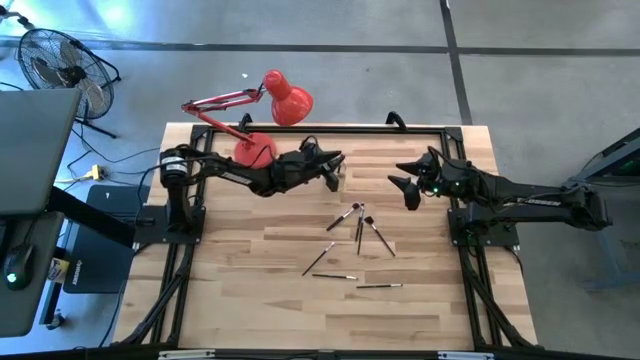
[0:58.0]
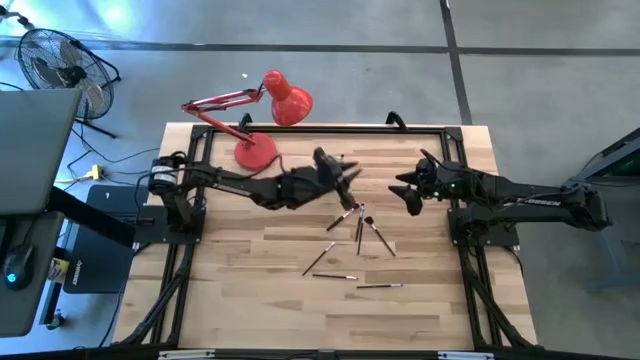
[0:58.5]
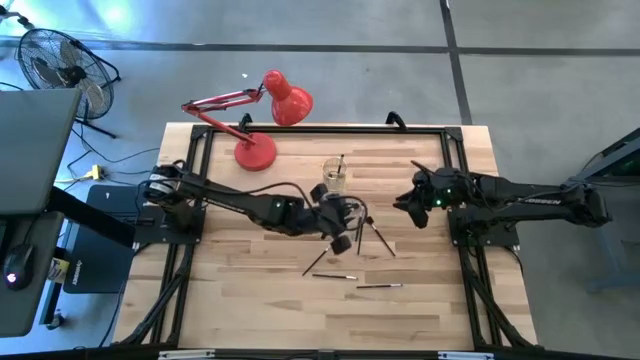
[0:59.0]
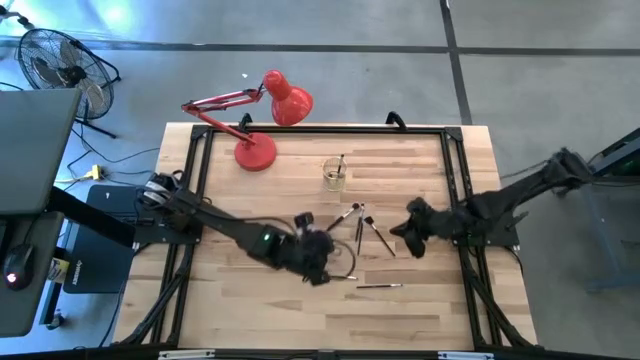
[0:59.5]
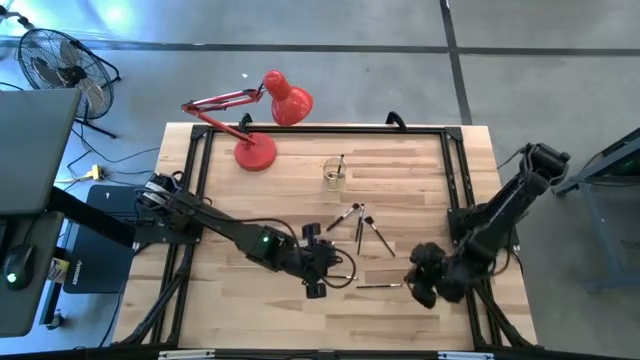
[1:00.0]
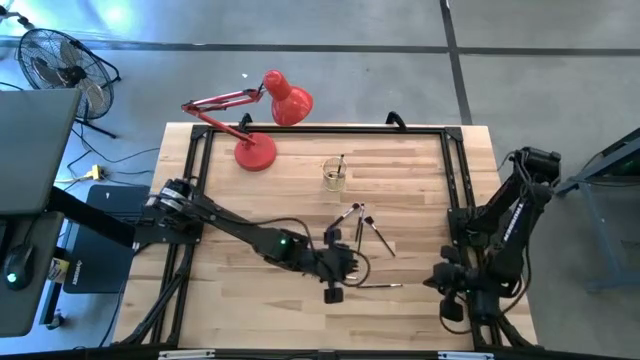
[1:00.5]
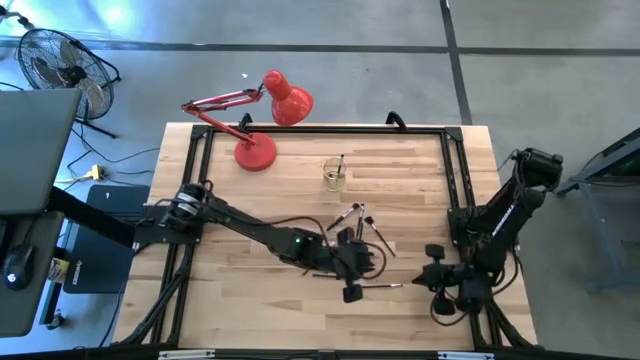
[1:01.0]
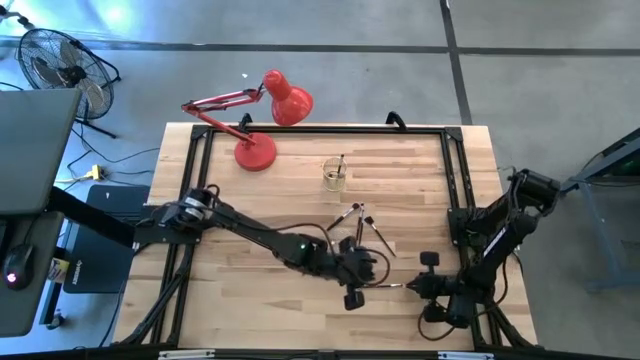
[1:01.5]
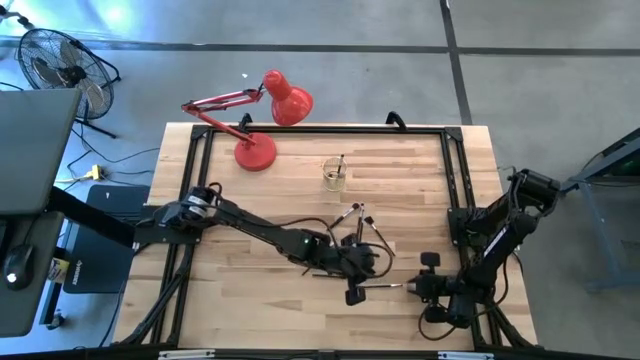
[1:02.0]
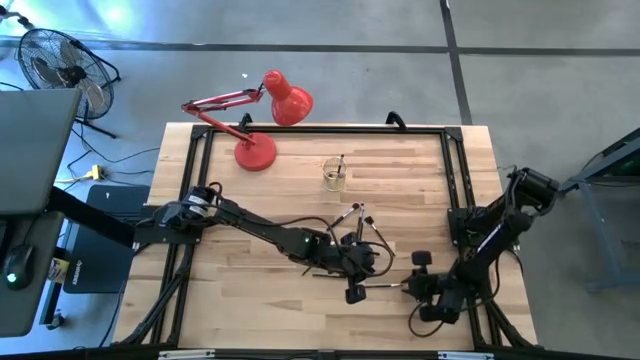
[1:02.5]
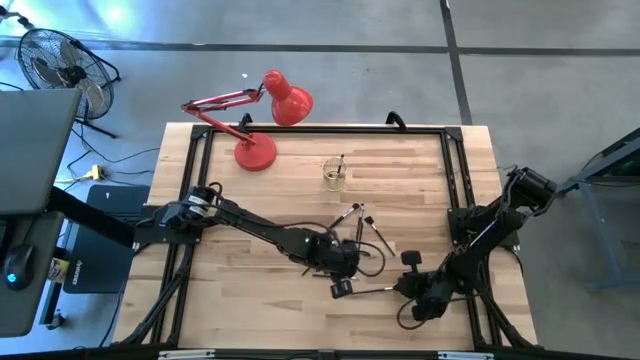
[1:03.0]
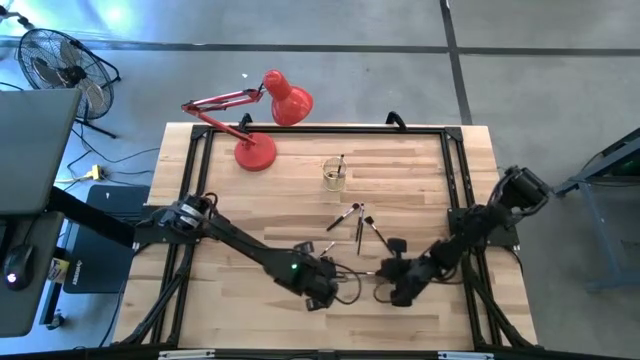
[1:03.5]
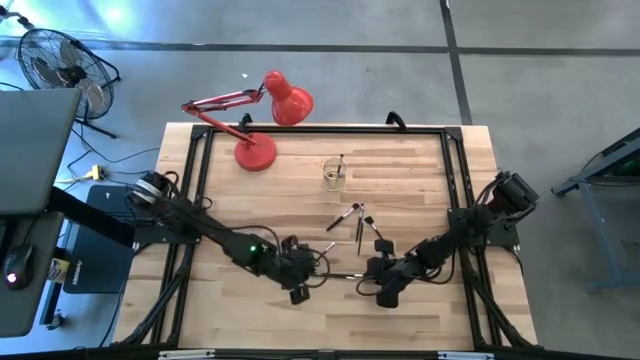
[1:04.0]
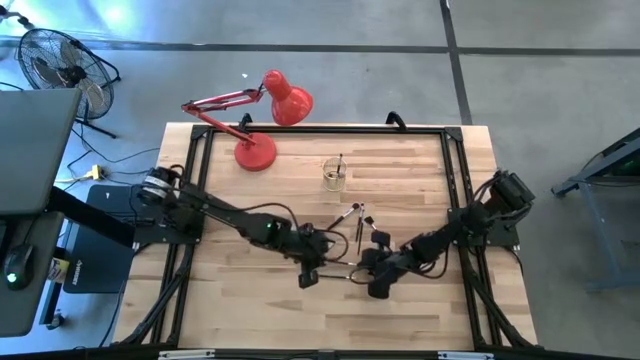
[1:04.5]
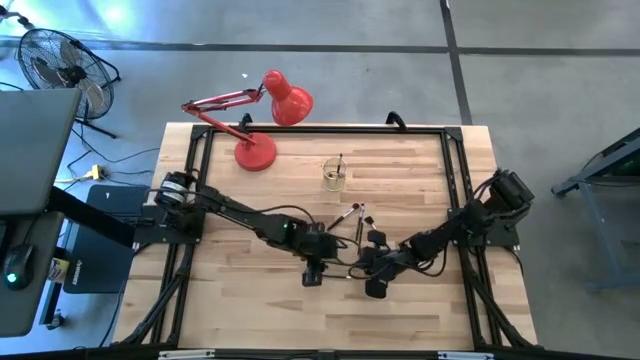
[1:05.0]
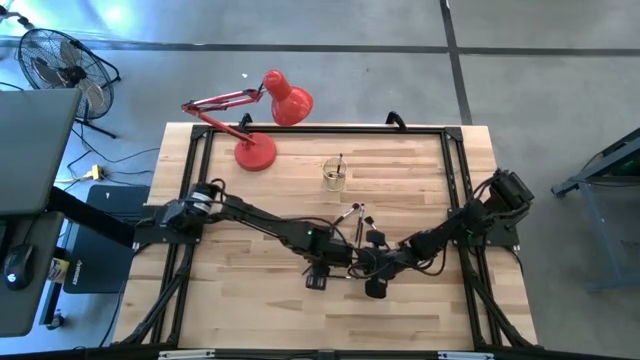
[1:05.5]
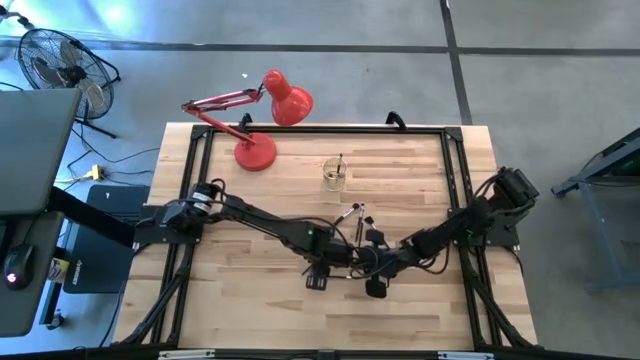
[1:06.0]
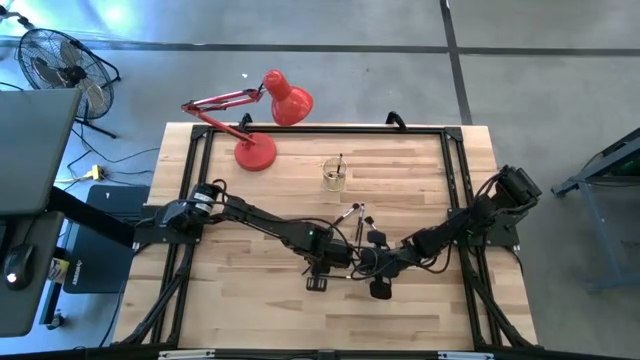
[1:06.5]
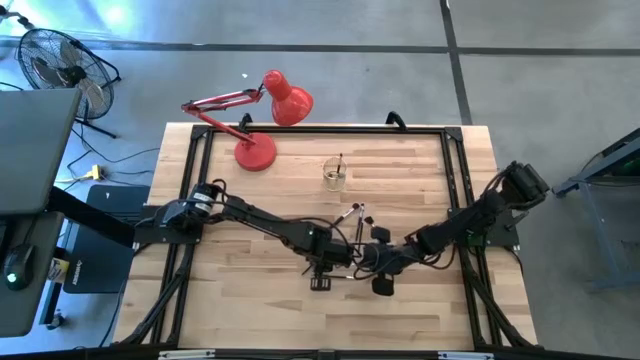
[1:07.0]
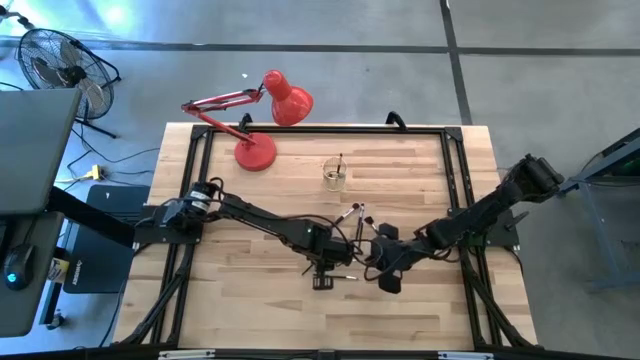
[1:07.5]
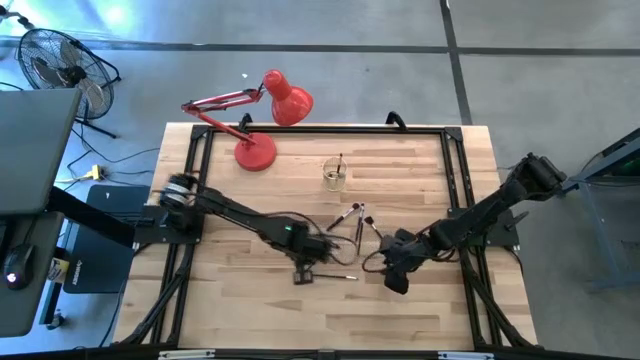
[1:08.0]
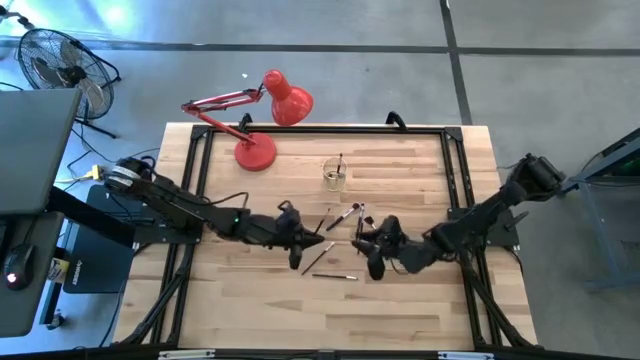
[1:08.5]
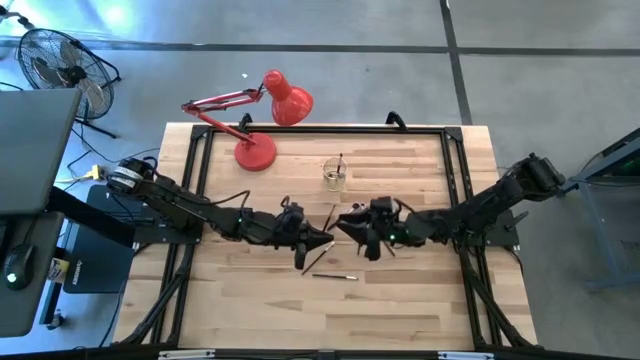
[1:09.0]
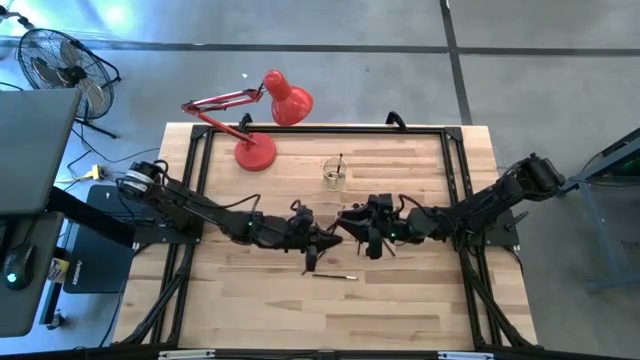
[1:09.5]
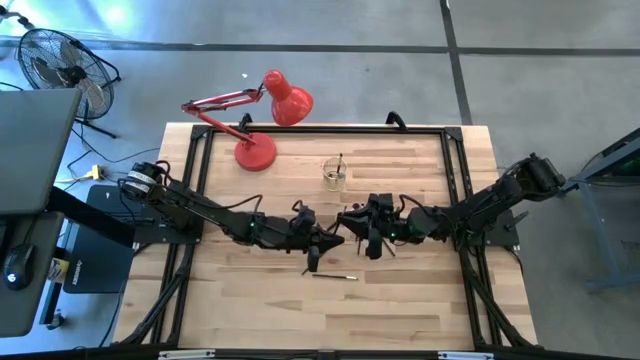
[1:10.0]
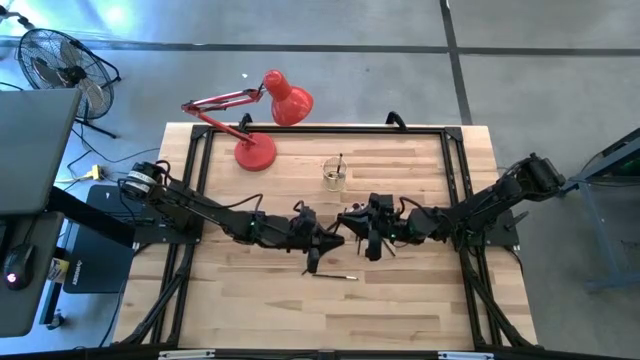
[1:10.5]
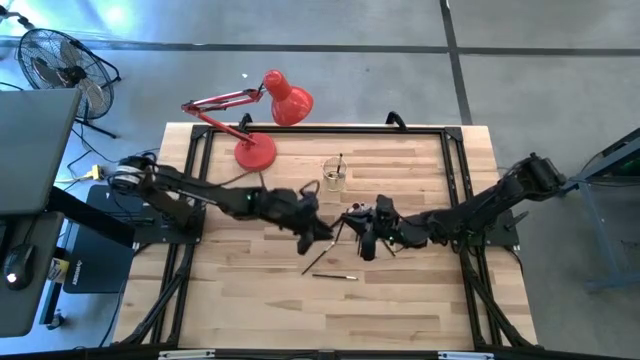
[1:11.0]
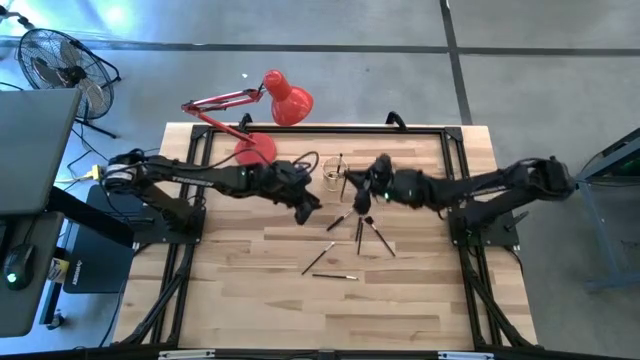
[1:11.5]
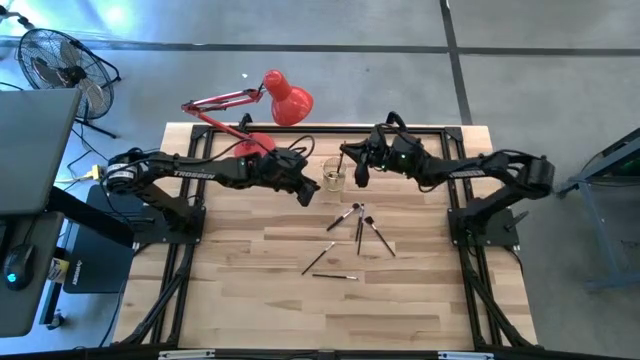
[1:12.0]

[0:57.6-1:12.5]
Task: Put items in baskets/containers
Put the makeup brush into the wire bin

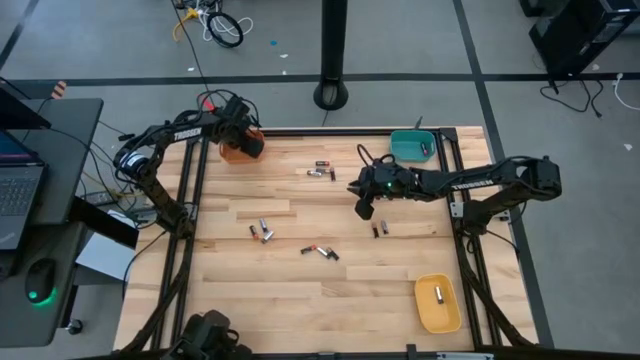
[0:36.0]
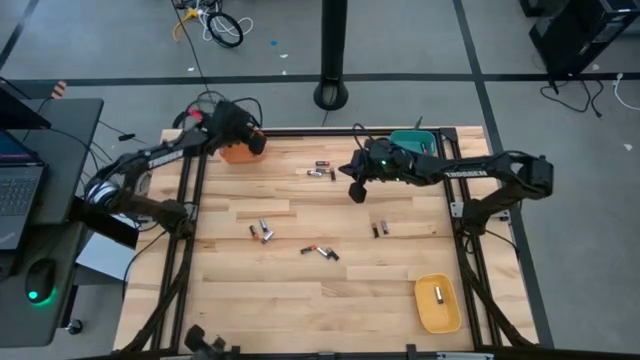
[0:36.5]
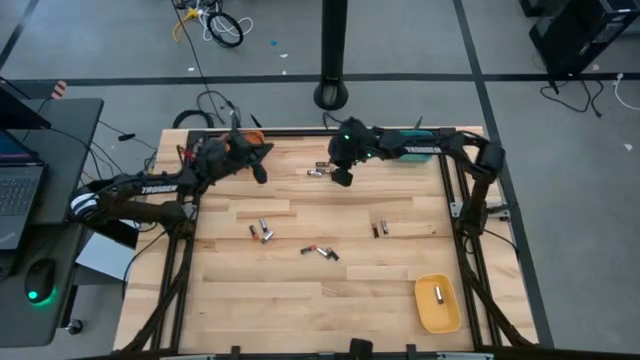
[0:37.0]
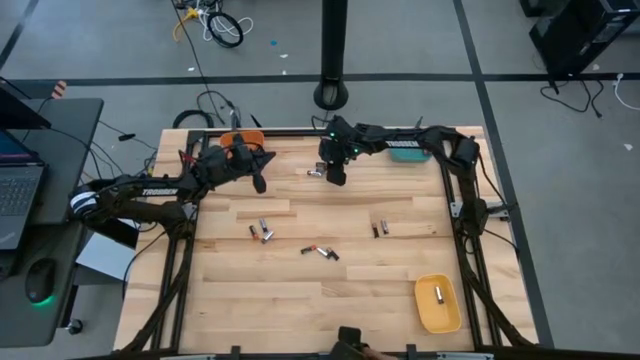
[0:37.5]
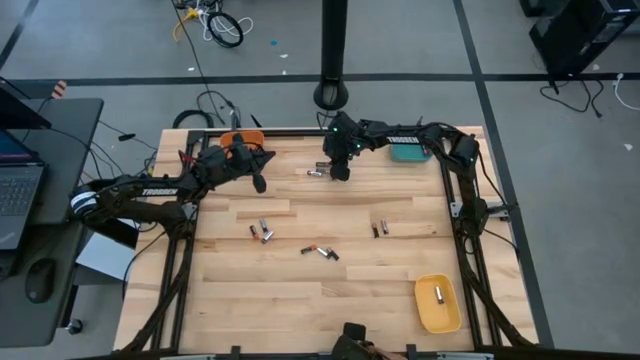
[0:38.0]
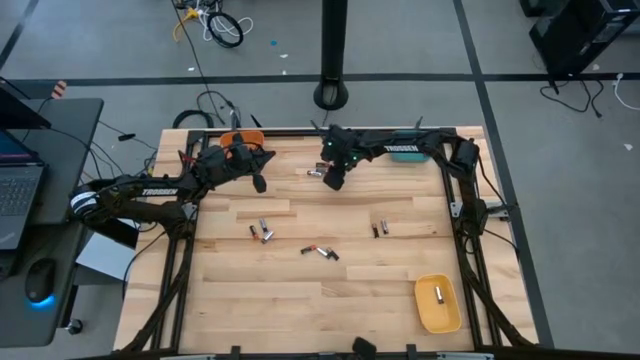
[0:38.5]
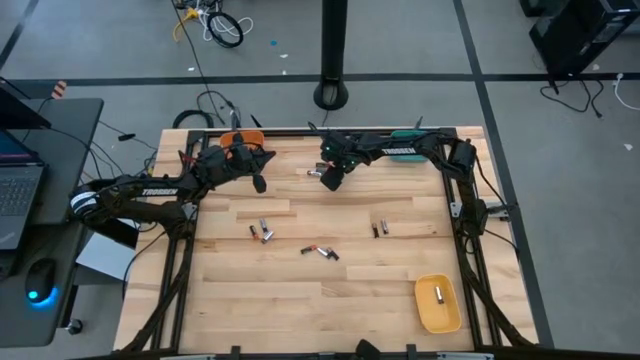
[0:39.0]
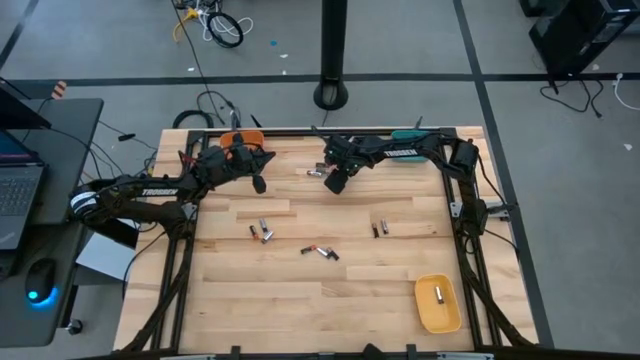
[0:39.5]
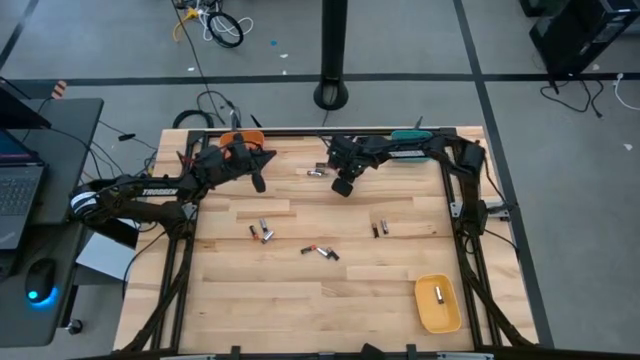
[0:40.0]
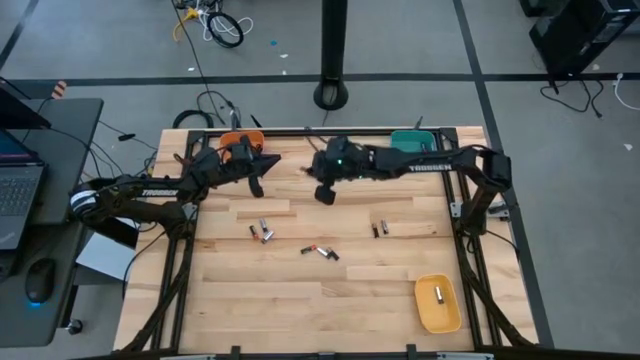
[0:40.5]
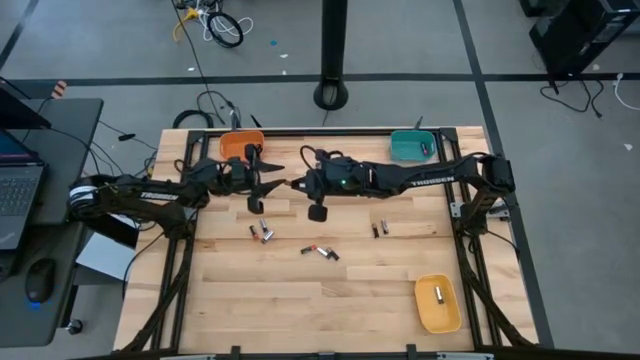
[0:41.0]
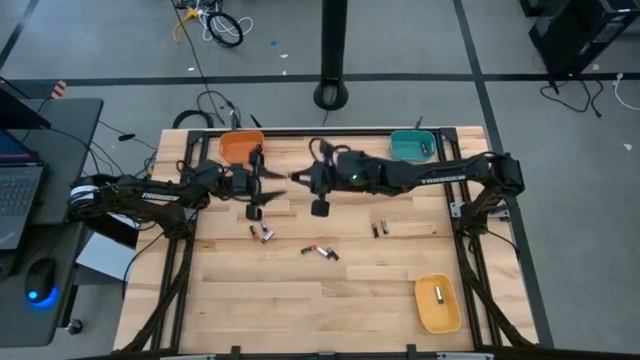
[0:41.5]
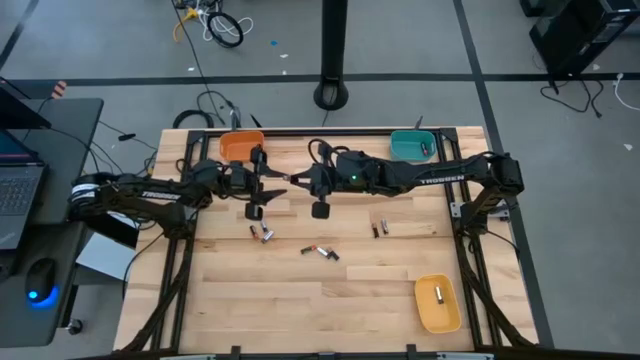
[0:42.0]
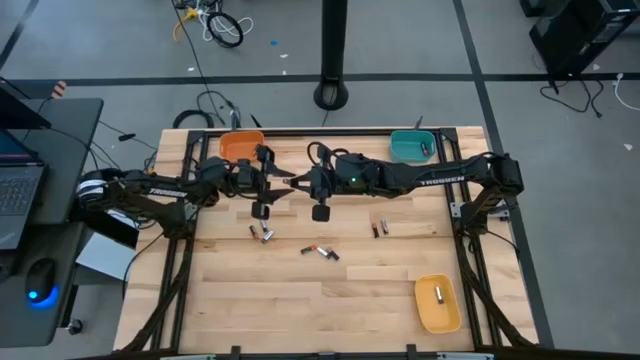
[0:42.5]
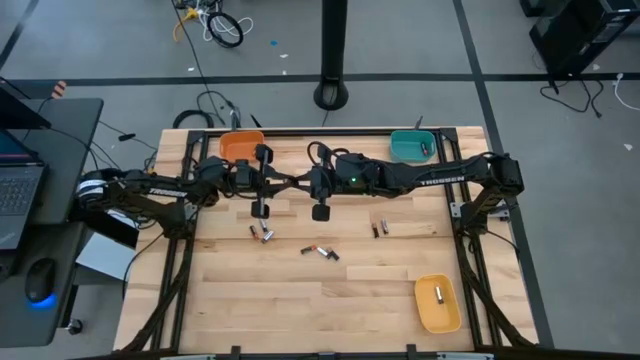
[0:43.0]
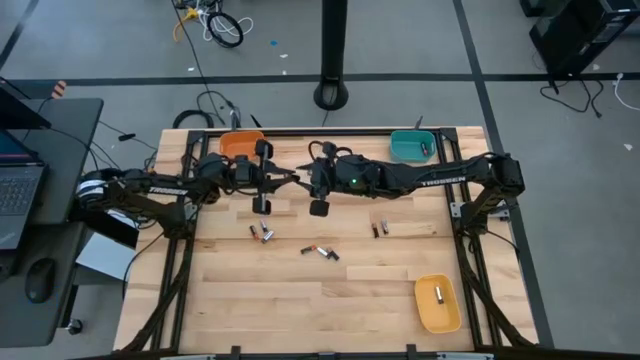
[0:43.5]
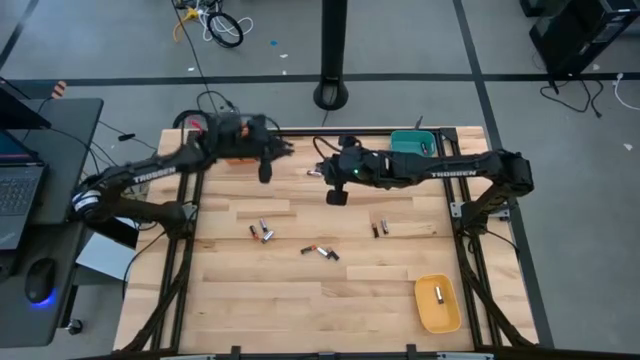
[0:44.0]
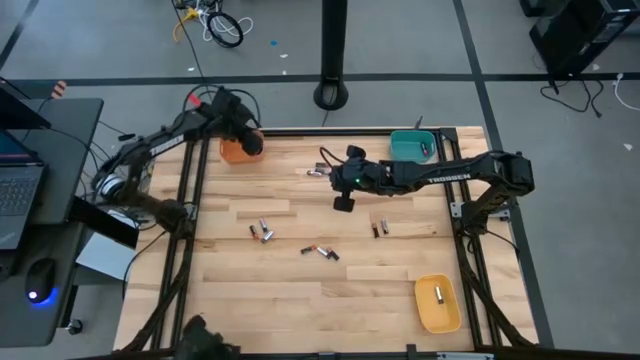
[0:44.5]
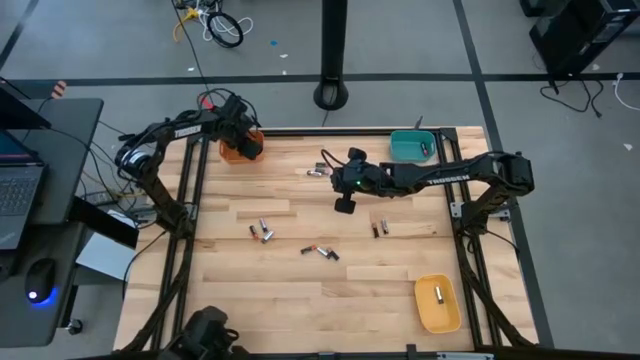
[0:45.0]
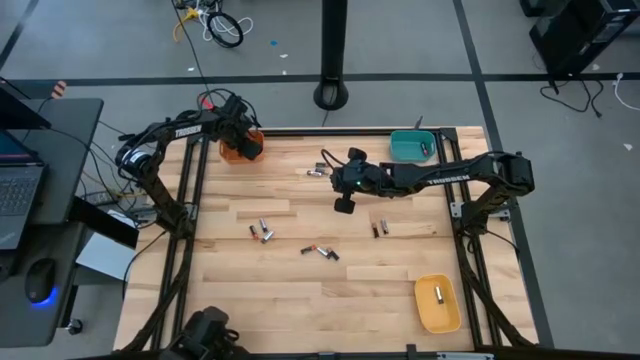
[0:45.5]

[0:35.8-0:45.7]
Task: Sort batteries
Put the black-orange battery into the orange bin
